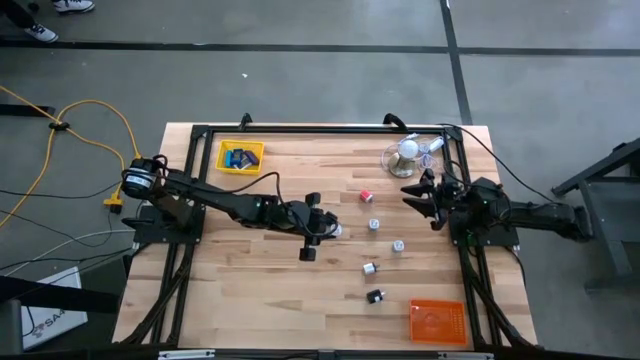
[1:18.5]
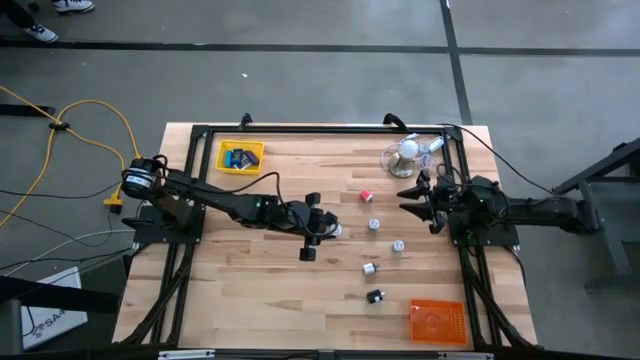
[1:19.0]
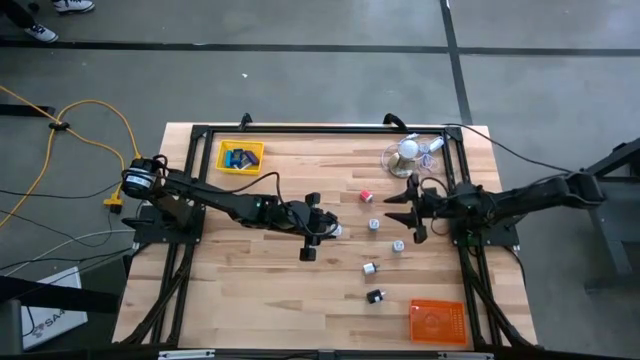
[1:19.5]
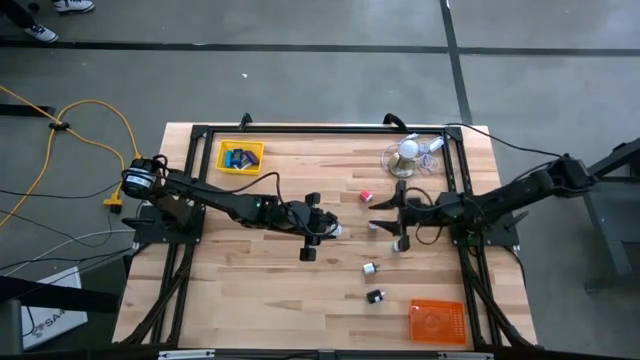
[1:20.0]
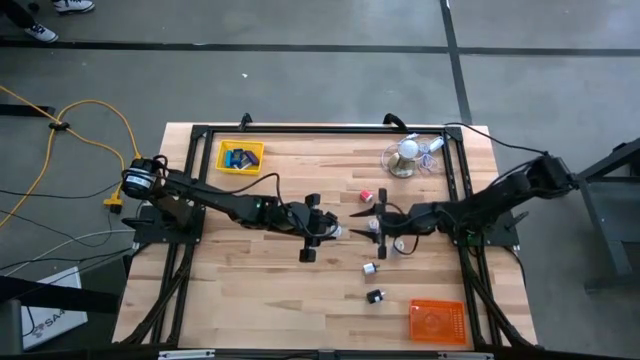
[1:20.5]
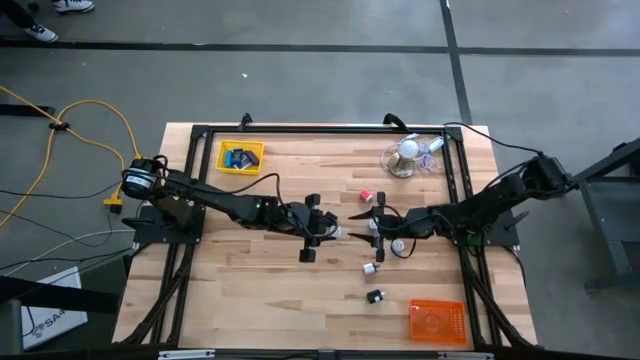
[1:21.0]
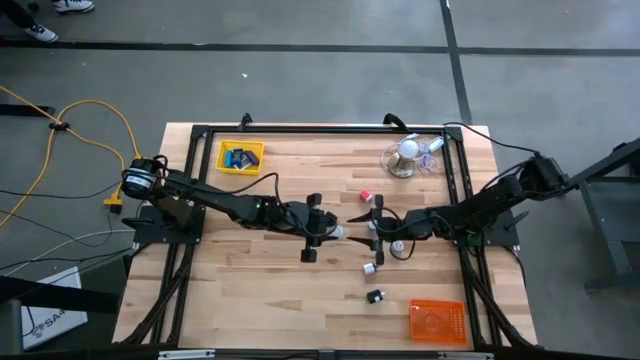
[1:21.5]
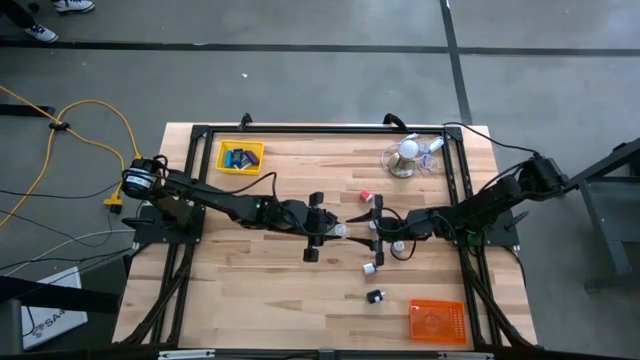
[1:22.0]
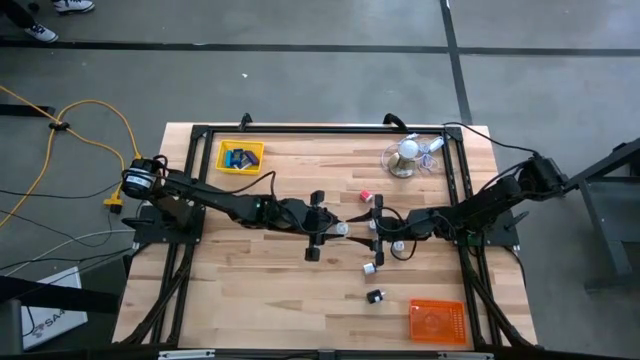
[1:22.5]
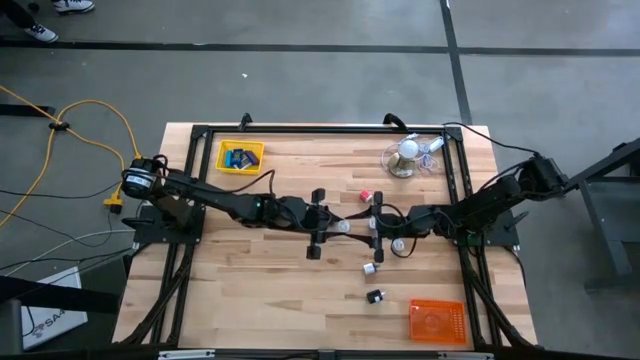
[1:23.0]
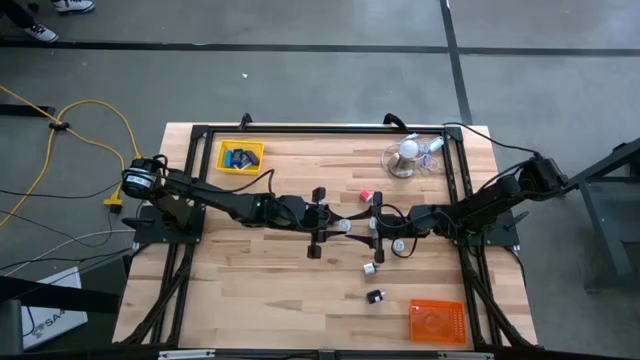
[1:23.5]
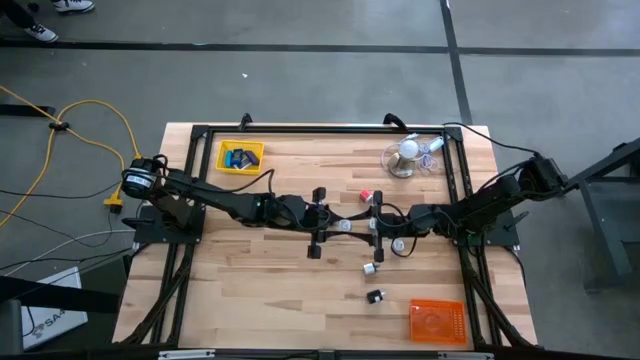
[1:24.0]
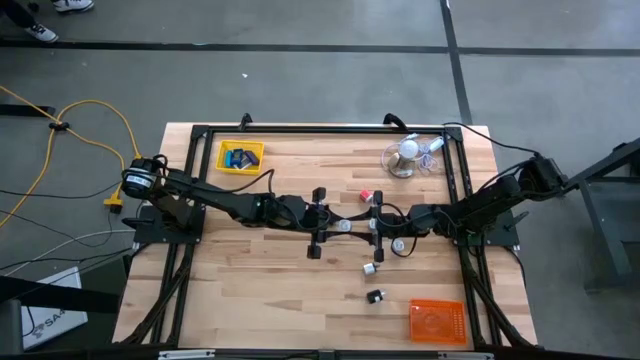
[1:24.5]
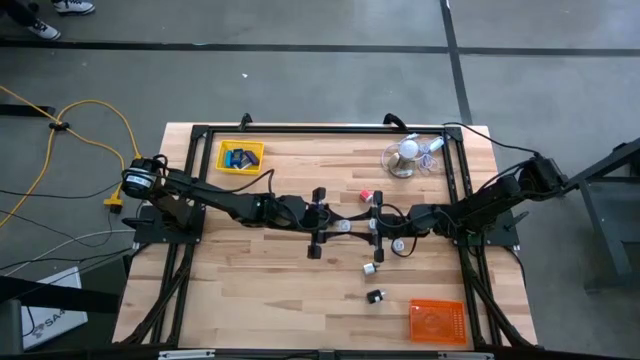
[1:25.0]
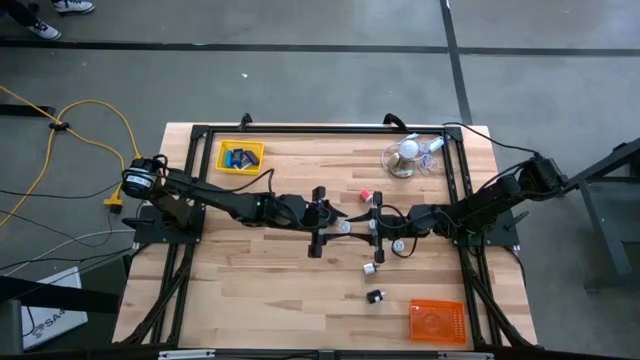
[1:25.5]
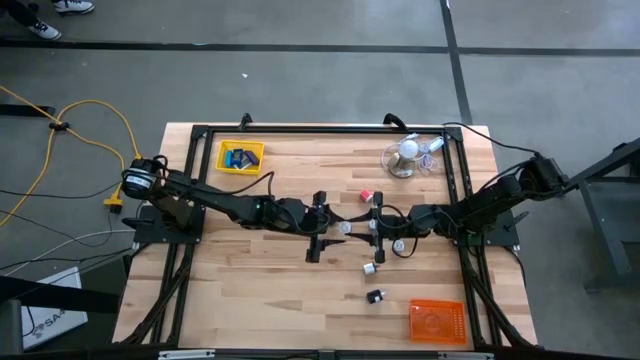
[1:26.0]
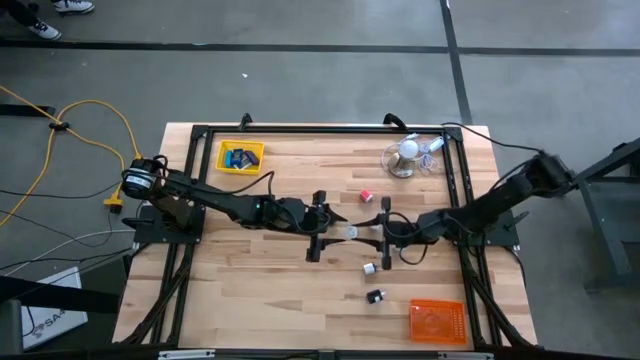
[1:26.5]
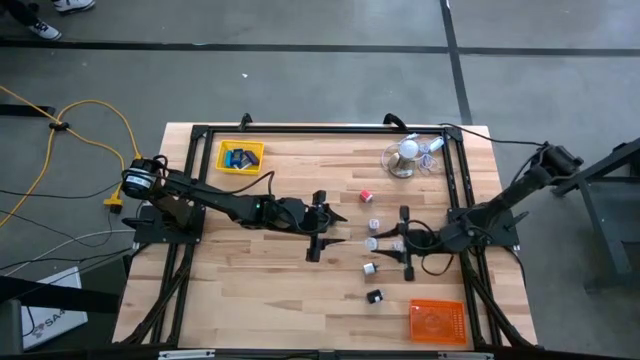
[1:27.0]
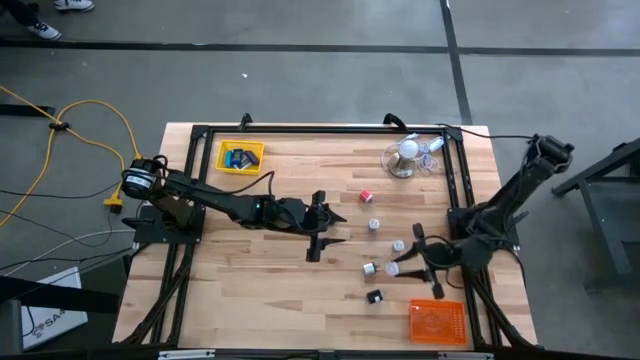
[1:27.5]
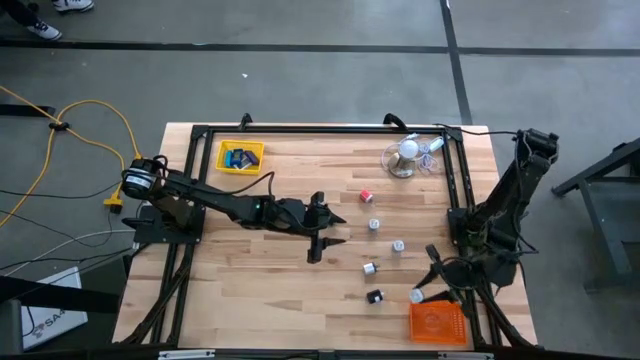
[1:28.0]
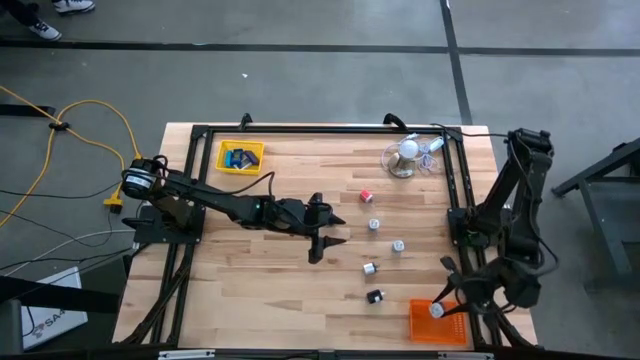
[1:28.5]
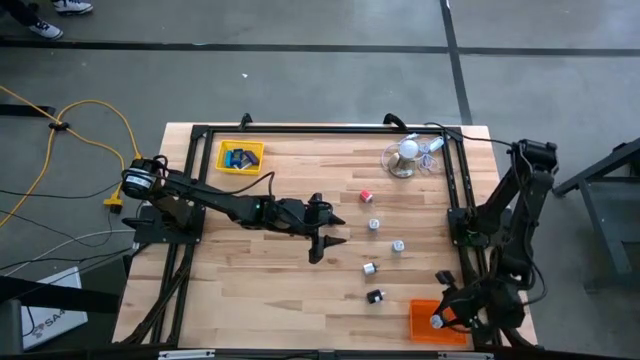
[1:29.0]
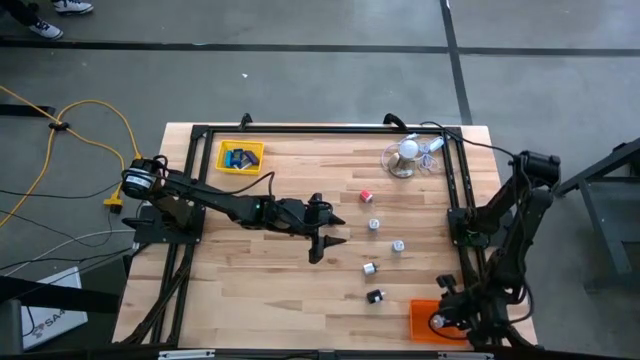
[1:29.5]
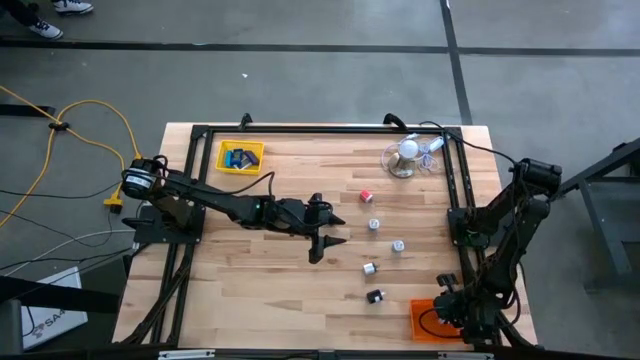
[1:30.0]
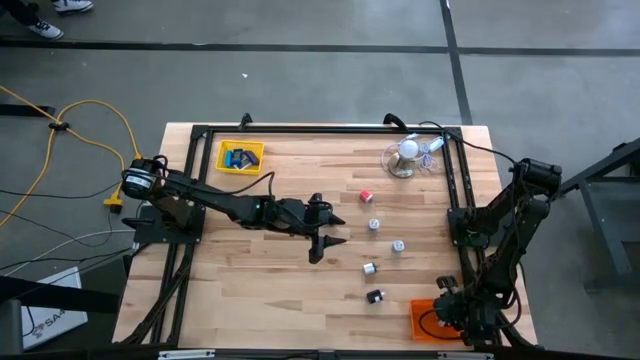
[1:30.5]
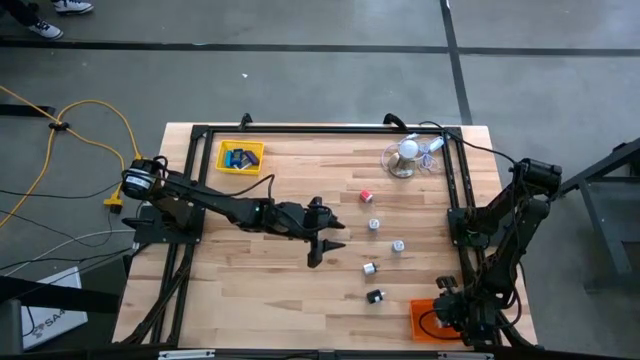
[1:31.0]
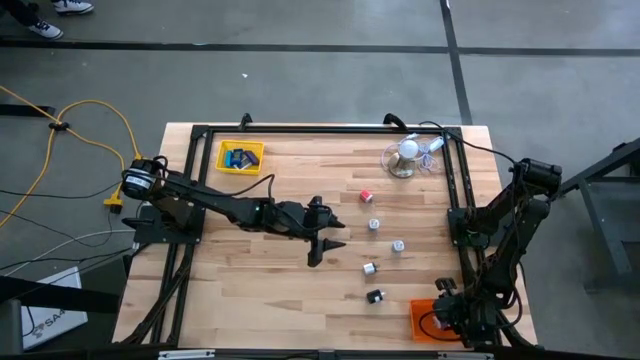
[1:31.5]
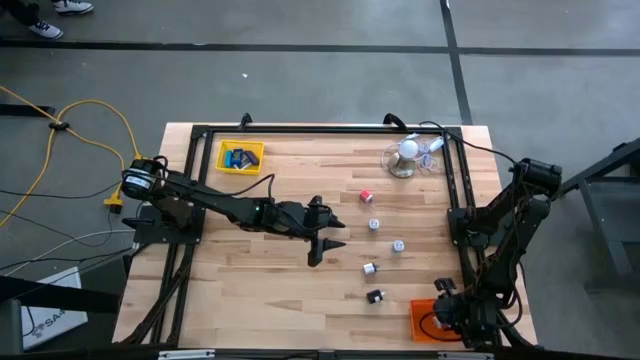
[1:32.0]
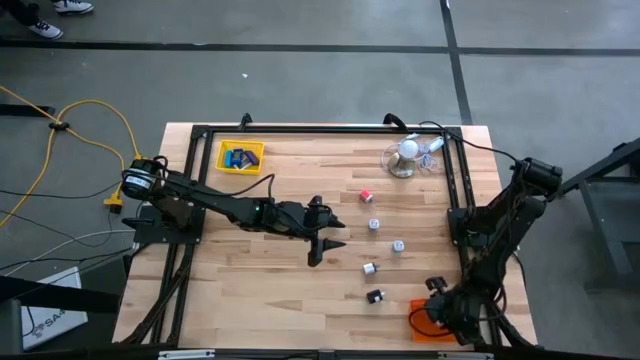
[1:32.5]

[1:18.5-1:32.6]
Task: Pick & Place Office items
Put the purple charger adapter into the orange bin

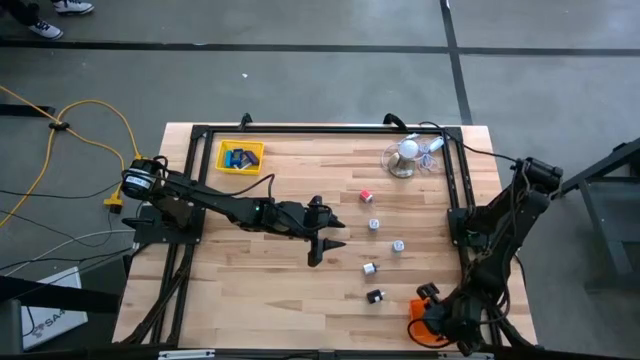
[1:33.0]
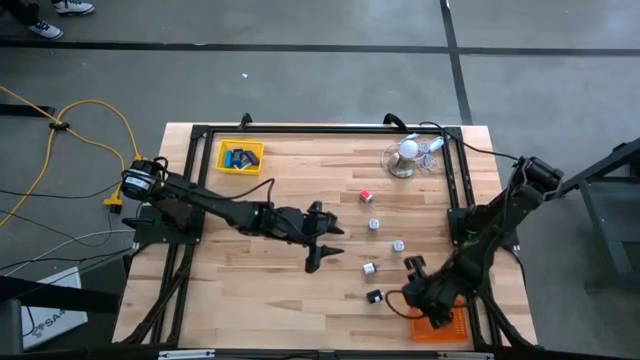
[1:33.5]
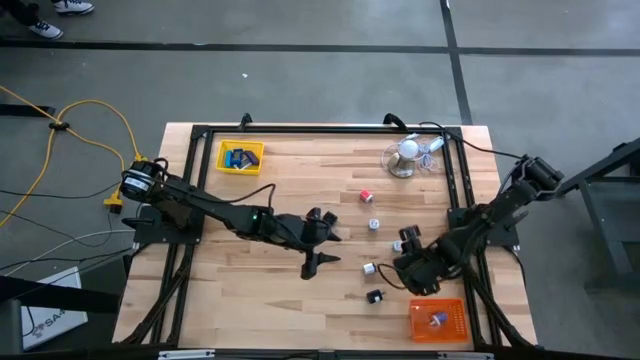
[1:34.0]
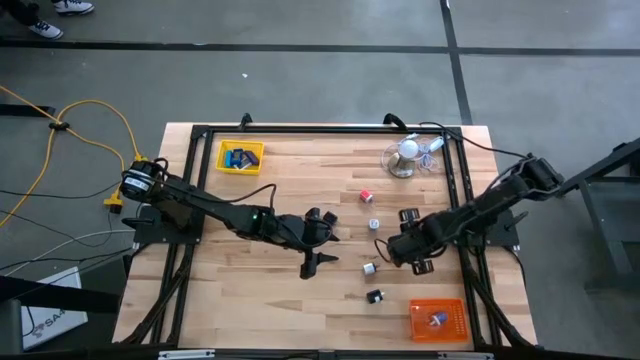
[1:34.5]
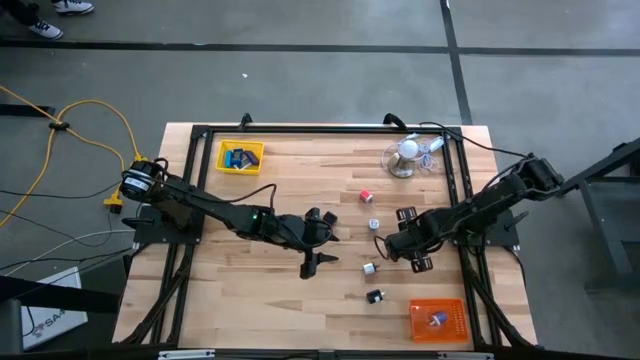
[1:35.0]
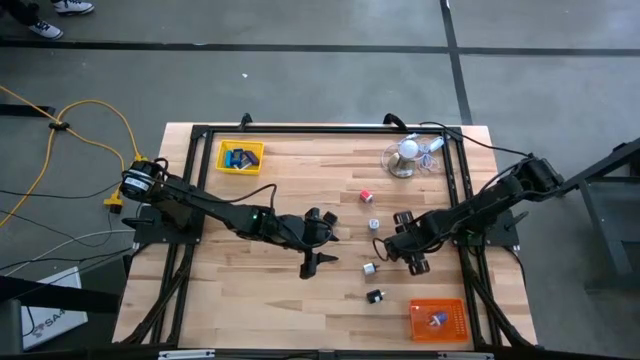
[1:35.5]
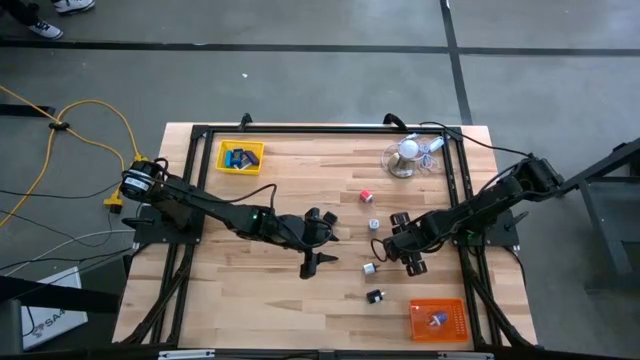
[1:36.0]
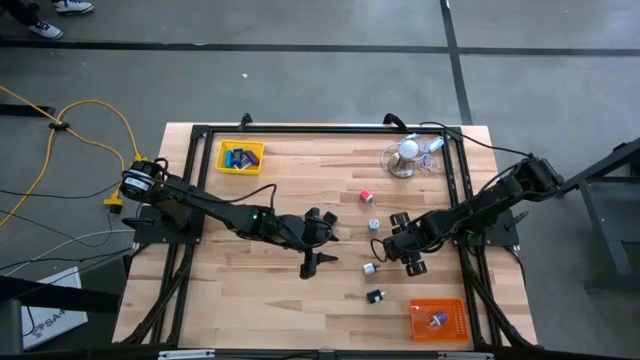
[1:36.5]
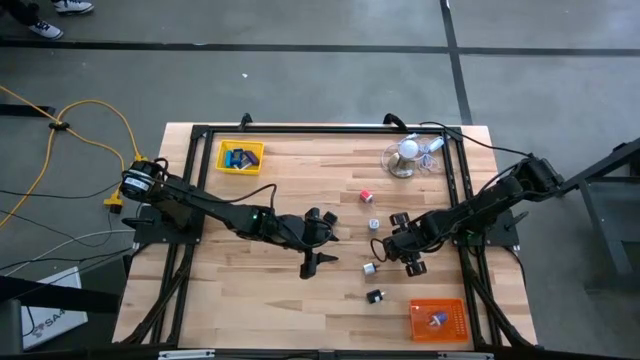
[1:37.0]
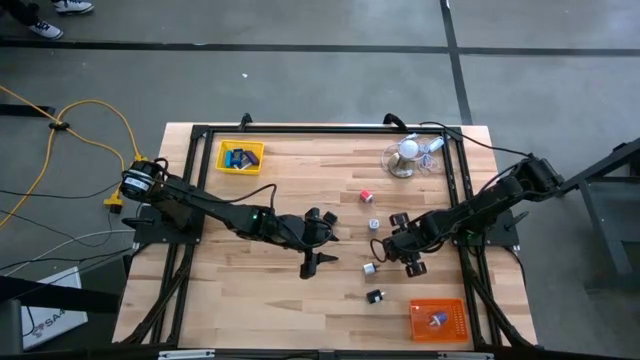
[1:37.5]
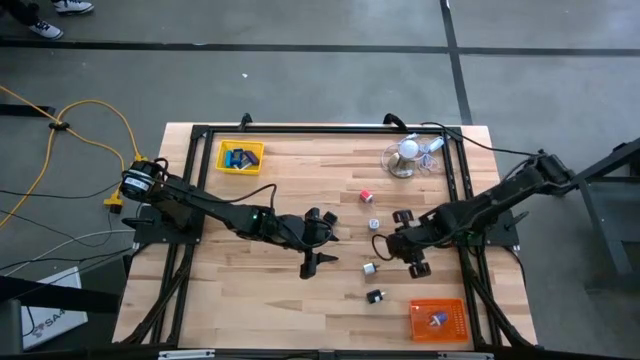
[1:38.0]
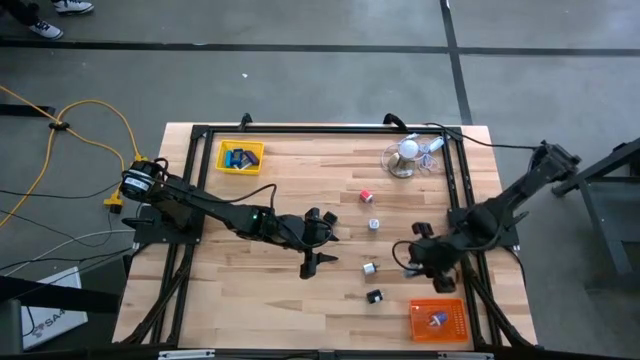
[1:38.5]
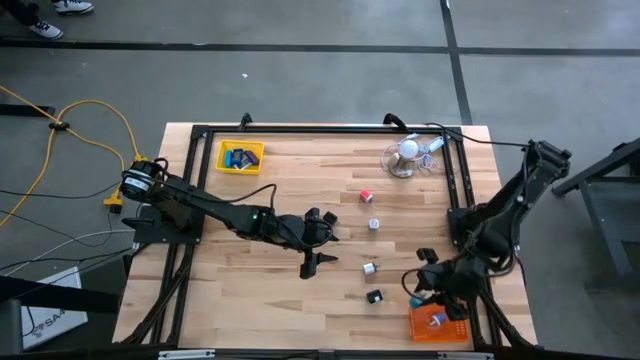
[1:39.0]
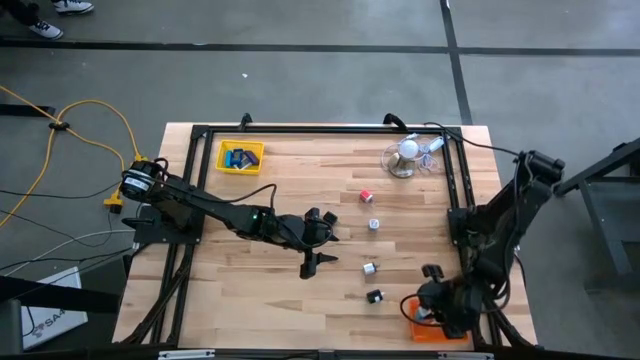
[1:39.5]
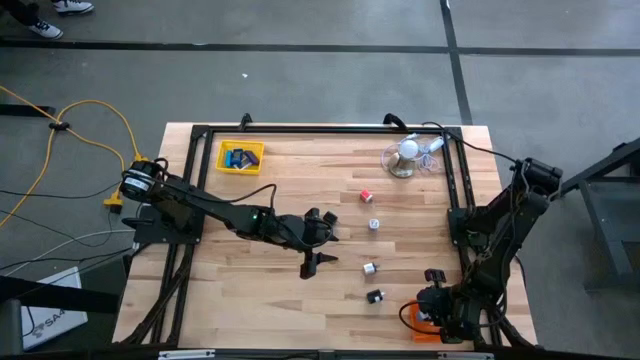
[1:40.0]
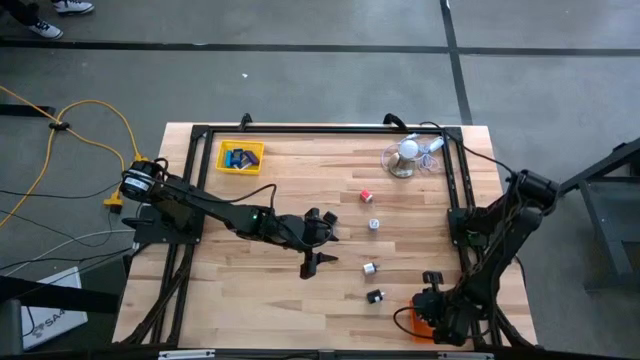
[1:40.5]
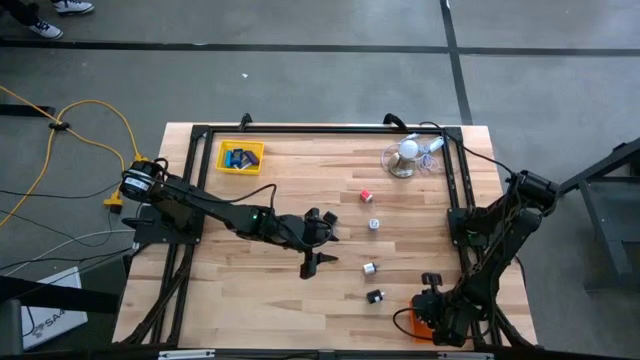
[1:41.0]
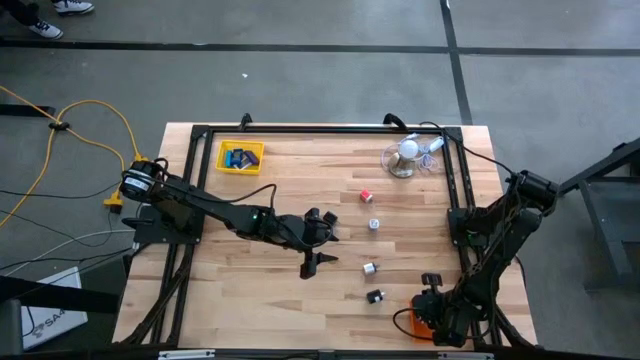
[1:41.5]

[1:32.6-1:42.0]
Put the bottom blue charger adapter into the orange bin
